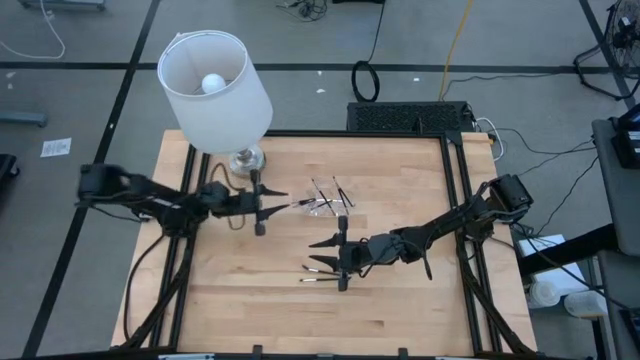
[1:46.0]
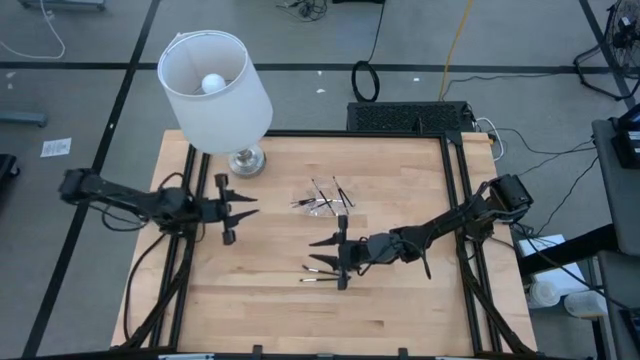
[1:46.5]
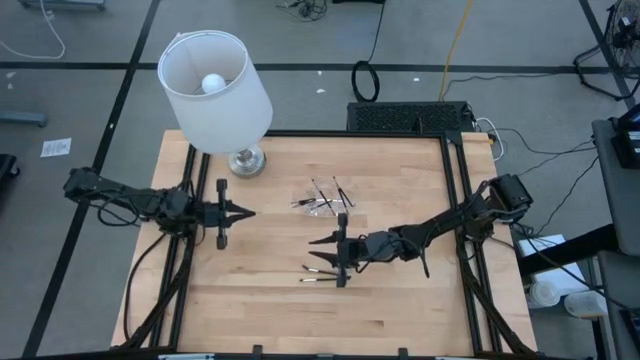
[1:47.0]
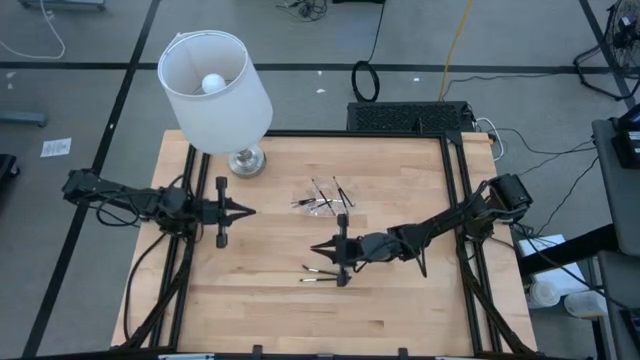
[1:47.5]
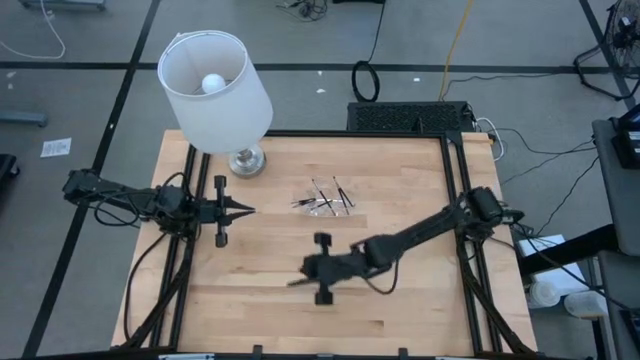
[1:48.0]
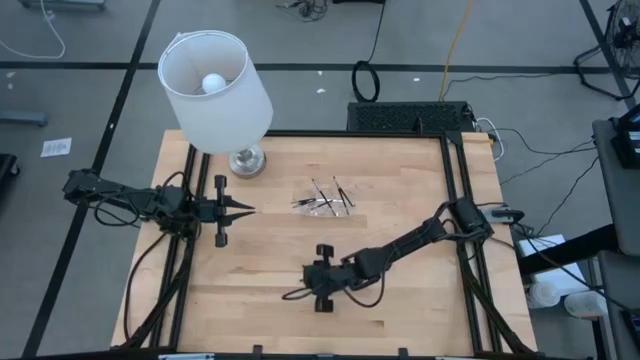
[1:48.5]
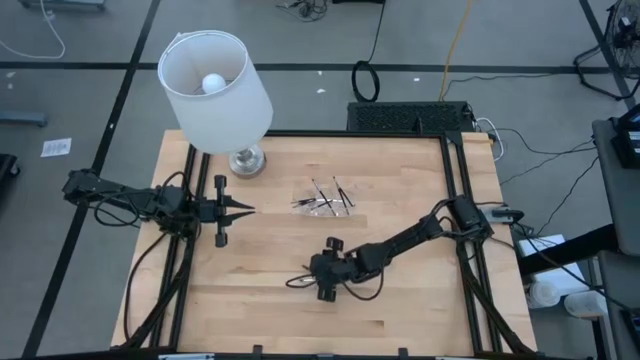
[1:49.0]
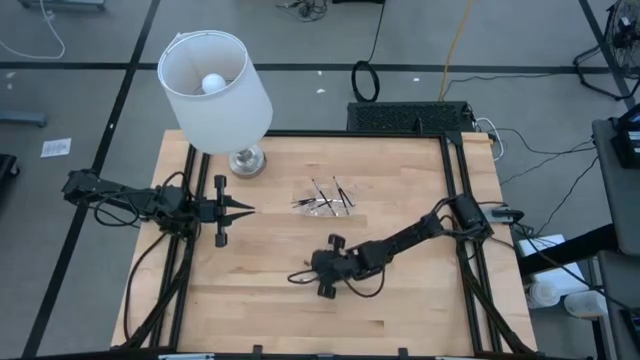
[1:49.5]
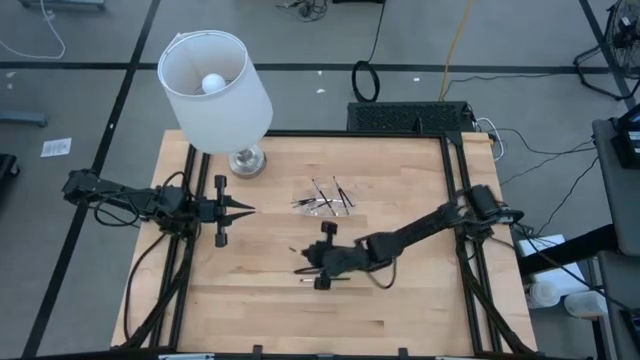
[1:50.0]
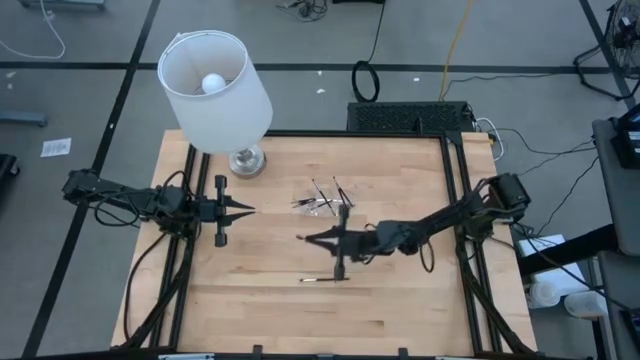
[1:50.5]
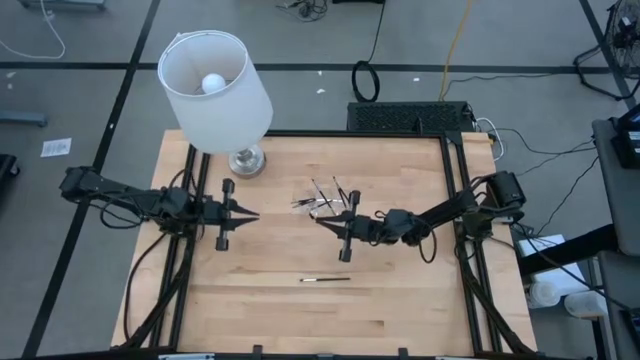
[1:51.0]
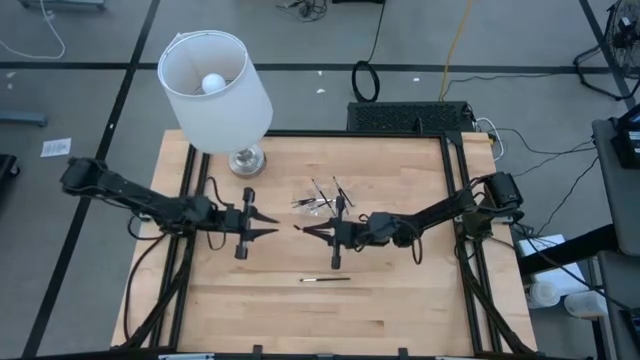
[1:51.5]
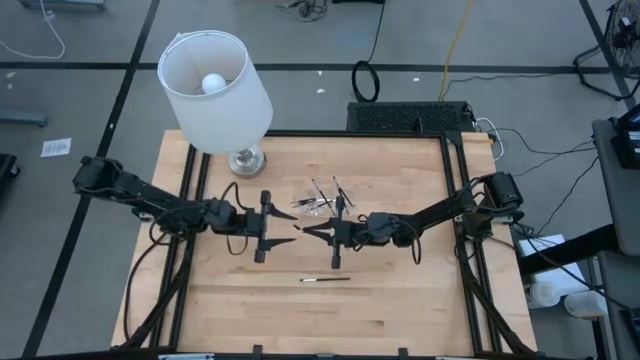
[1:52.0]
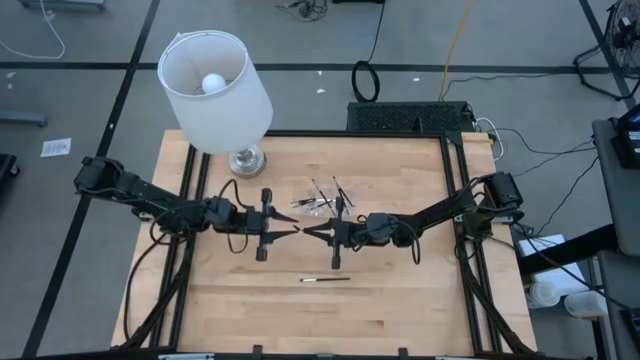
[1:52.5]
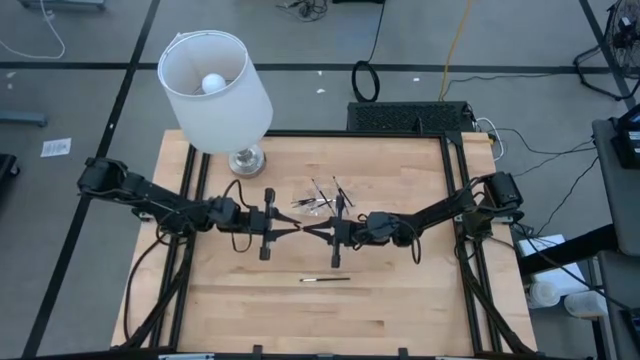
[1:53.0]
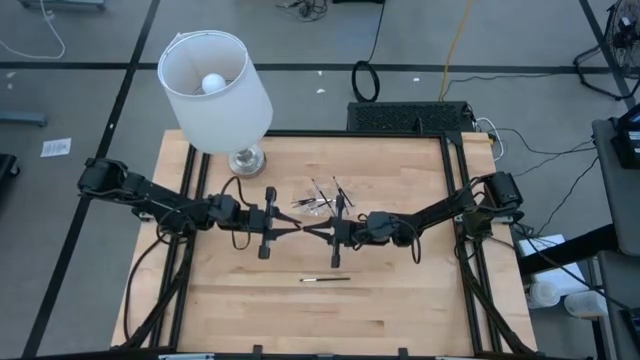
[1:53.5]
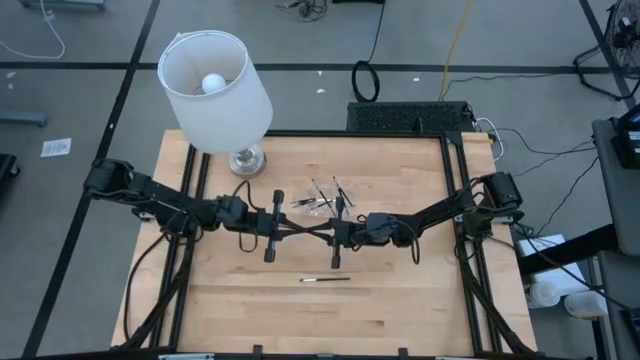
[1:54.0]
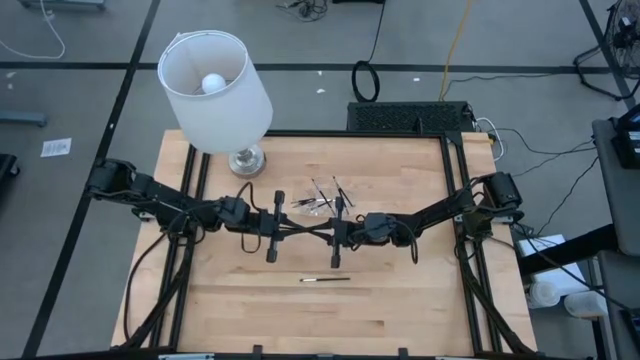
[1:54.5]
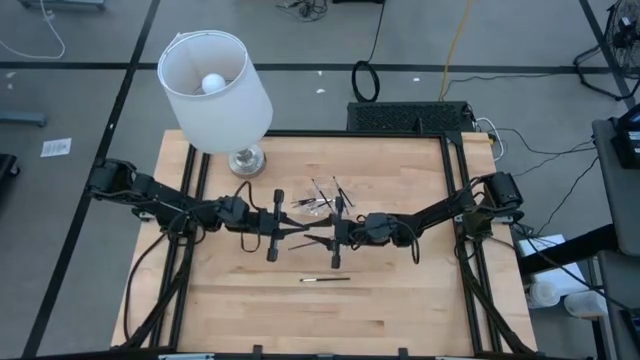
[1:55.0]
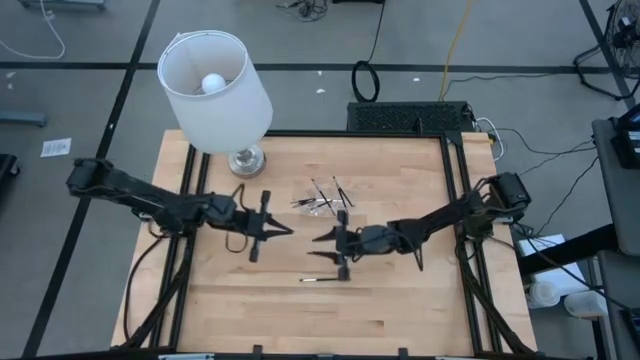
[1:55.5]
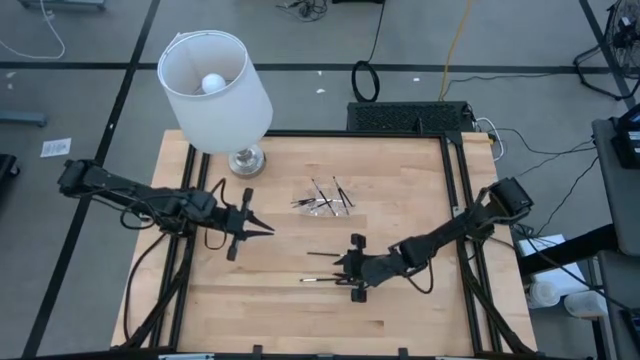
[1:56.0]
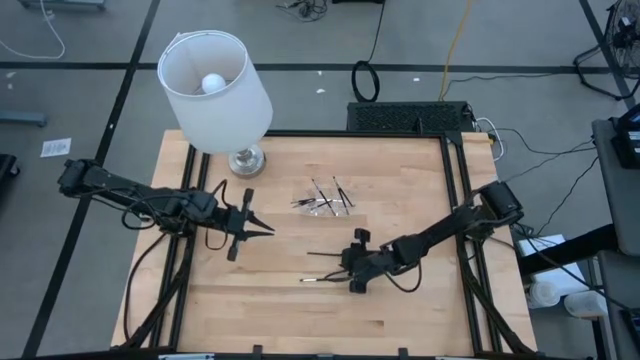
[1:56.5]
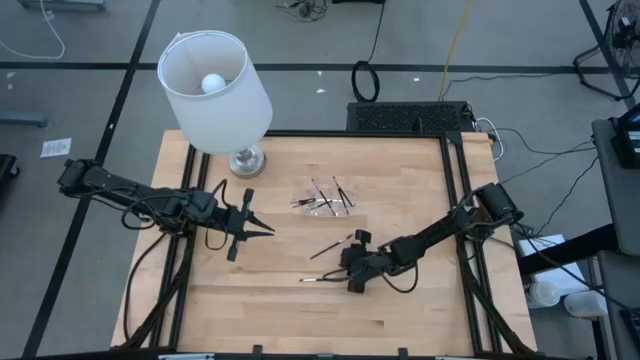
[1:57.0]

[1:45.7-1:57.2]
Task: Put items in baskets/containers
Put the brow brush into the transparent organizer

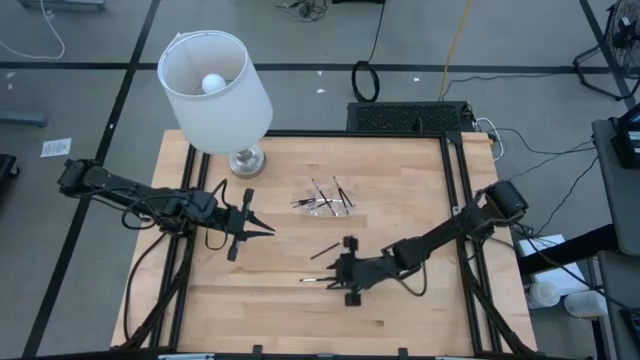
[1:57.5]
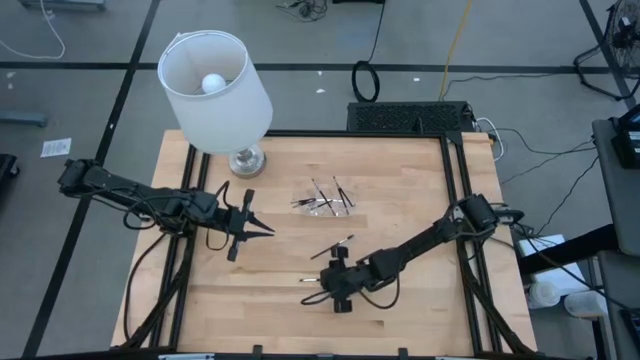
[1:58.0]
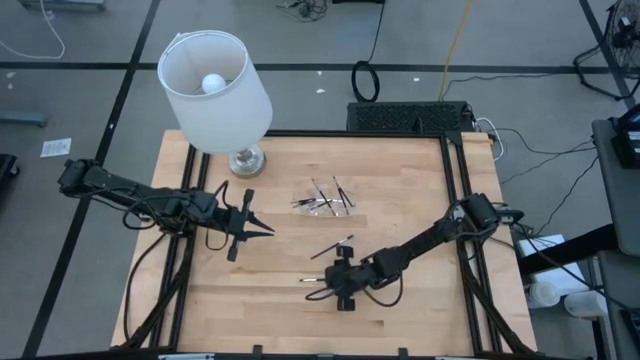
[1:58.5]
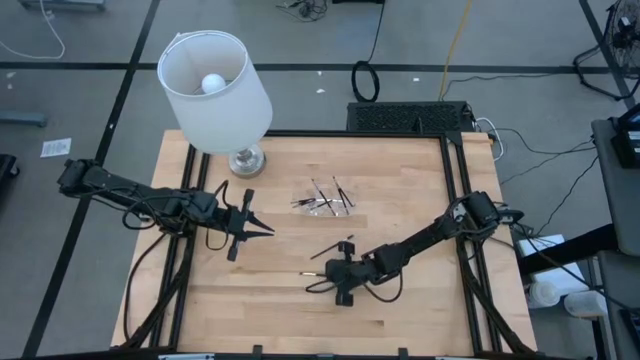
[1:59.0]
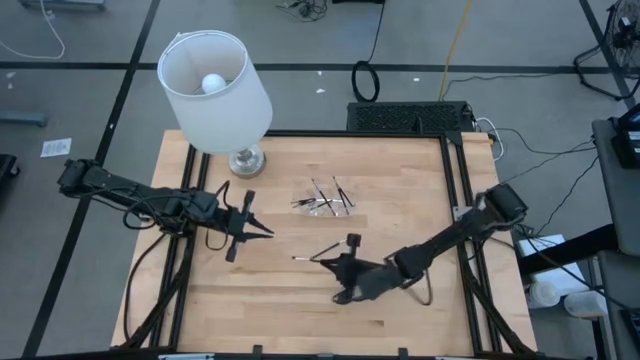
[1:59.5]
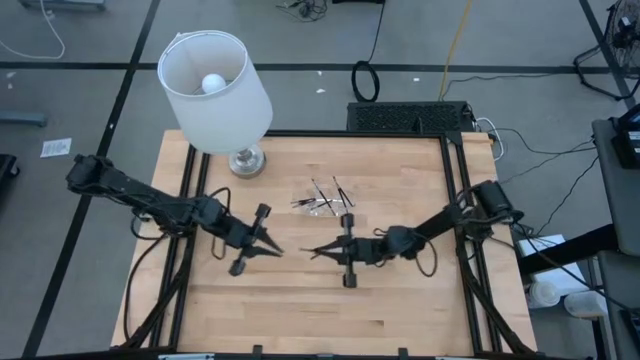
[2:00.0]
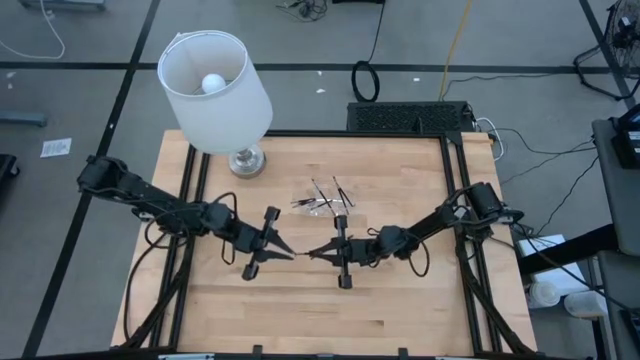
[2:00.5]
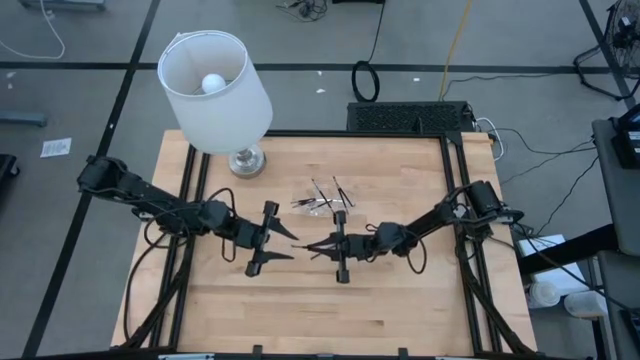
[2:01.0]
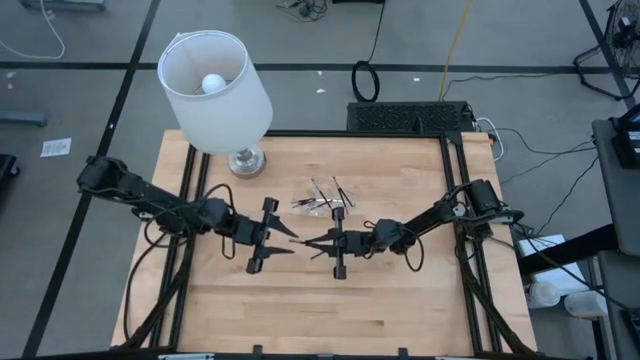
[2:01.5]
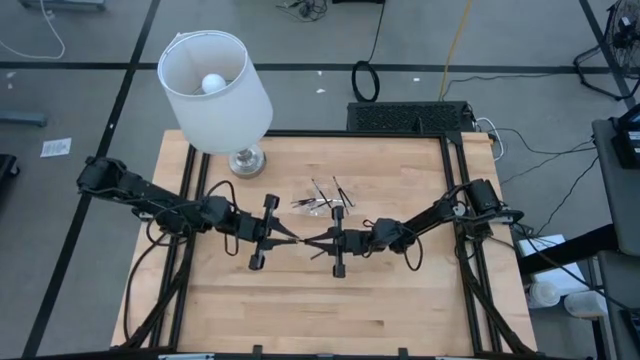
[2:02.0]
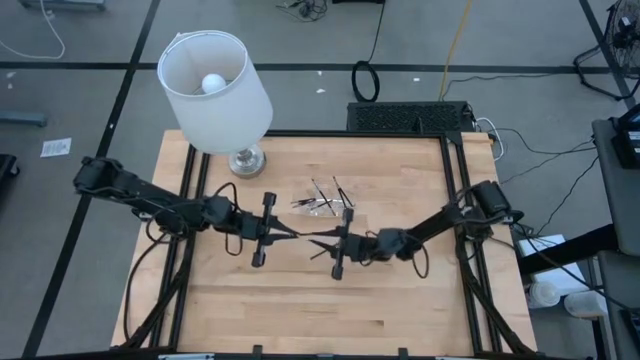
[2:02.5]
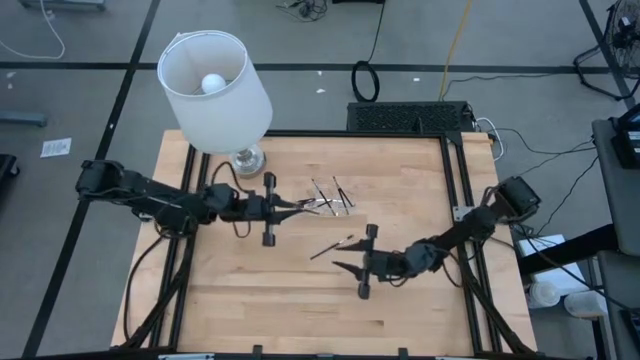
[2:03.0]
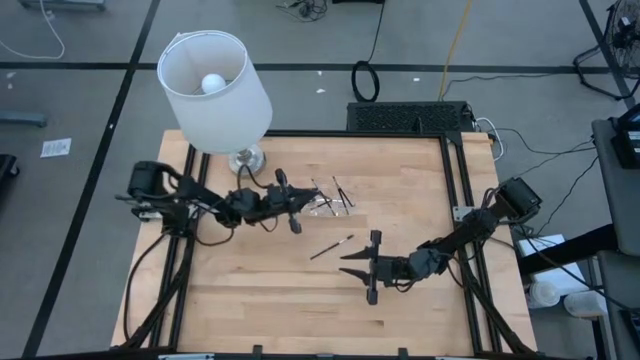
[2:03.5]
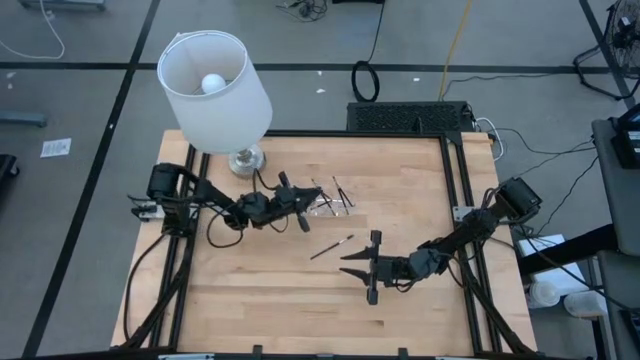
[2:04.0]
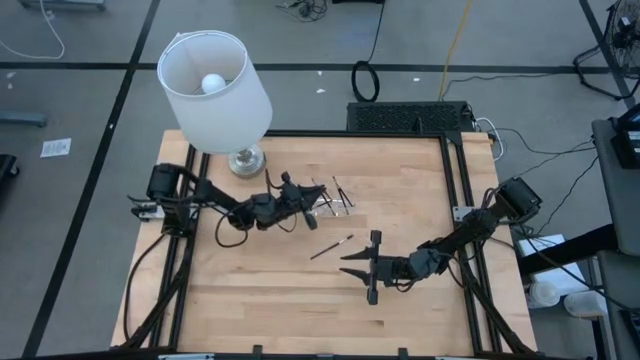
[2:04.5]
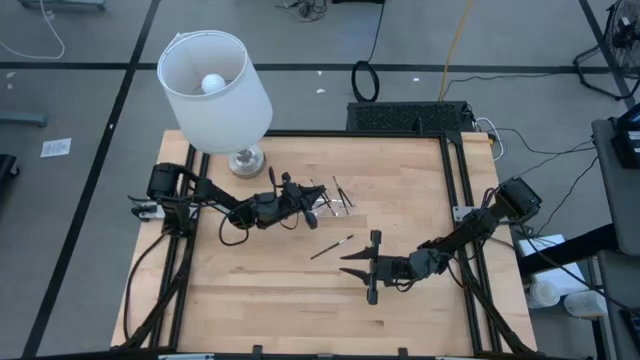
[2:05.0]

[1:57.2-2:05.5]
Put the eyeshadow brush into the transparent organizer

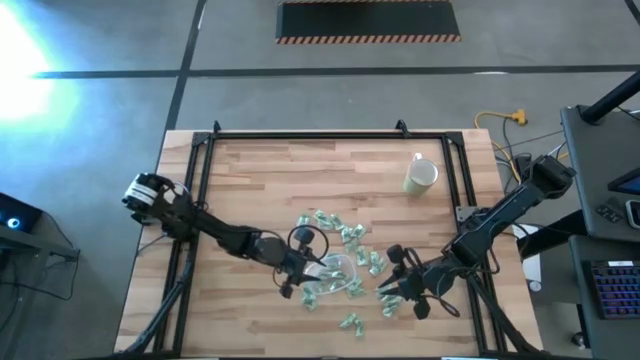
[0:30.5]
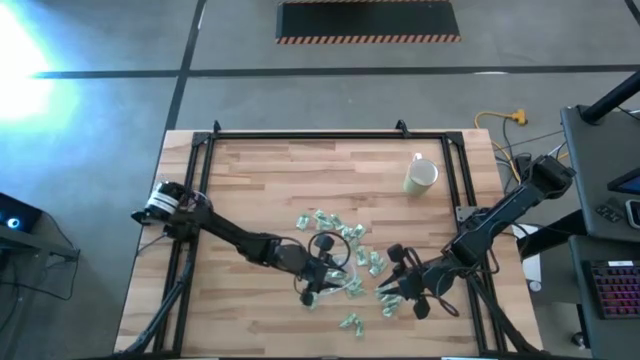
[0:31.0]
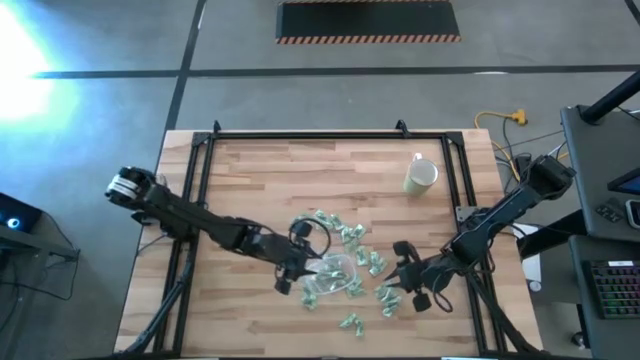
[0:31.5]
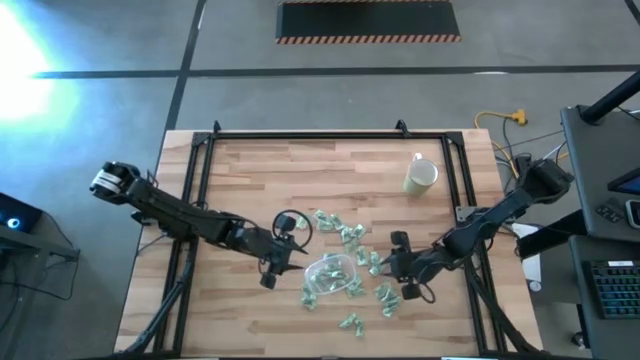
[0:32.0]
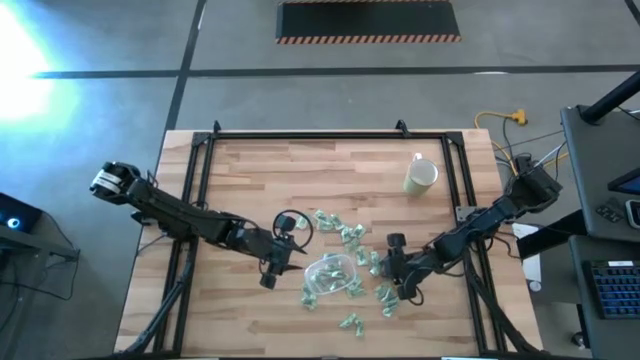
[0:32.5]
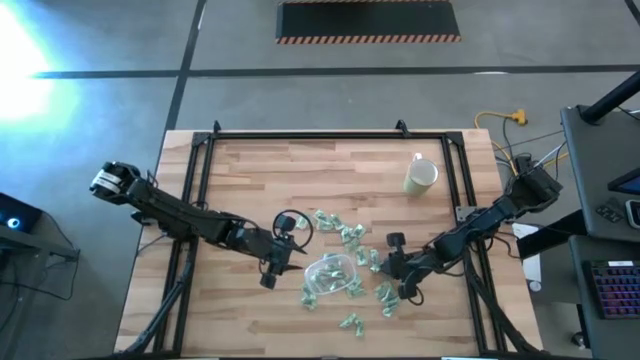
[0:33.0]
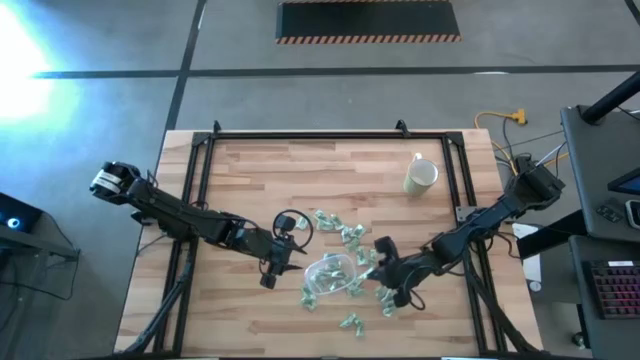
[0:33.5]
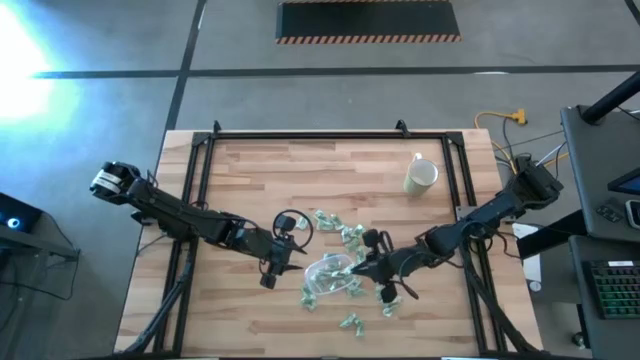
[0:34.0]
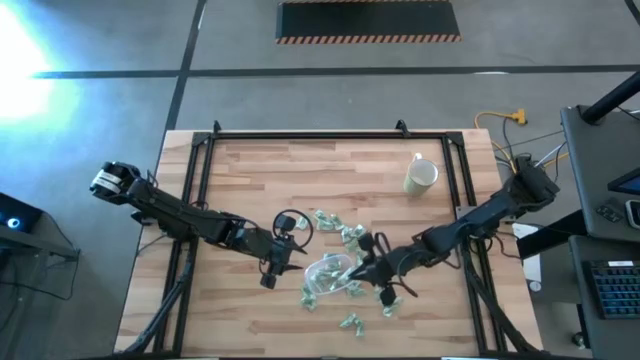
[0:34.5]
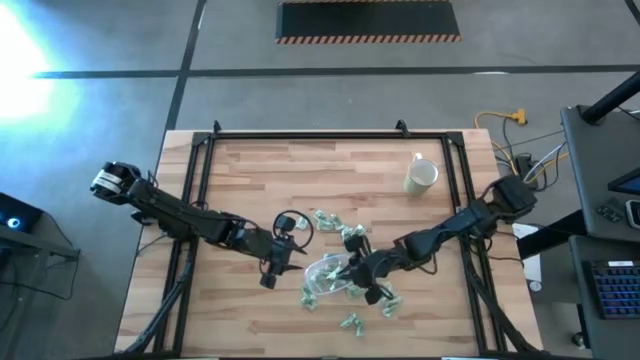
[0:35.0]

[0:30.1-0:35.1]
Task: Pick and place items into bin
Put the Stevia packet into the transparent bin
